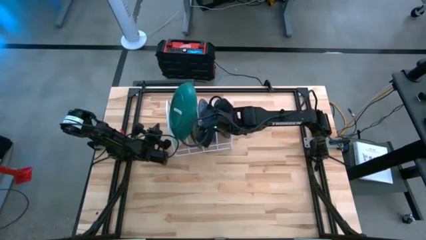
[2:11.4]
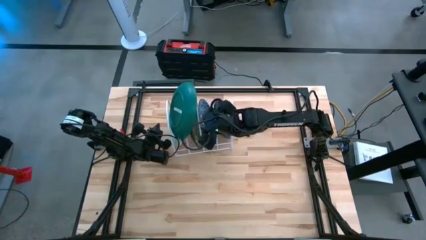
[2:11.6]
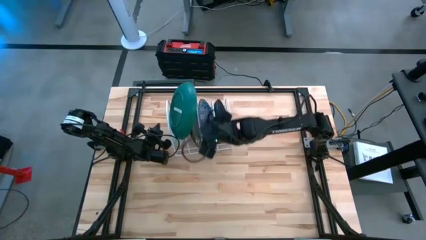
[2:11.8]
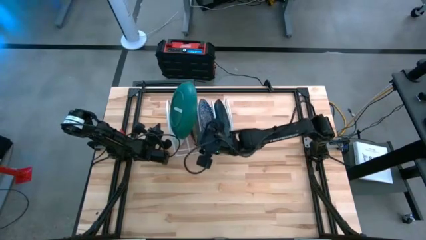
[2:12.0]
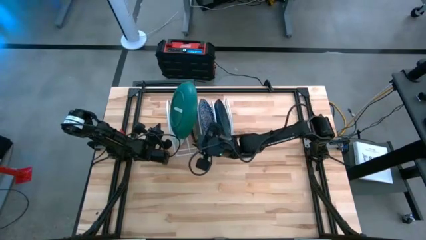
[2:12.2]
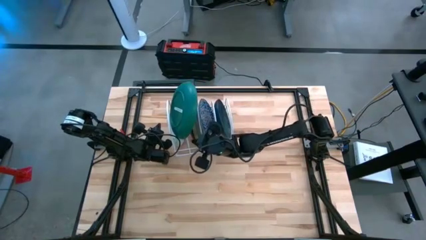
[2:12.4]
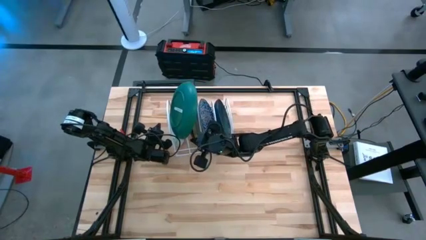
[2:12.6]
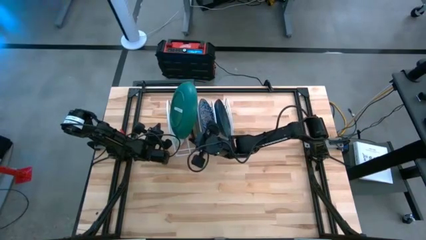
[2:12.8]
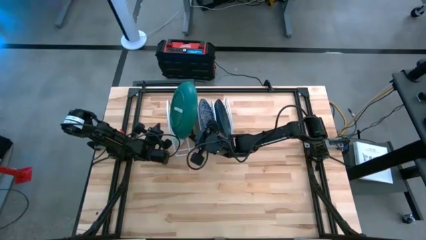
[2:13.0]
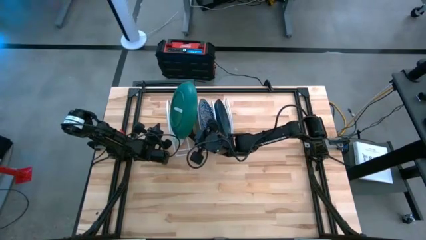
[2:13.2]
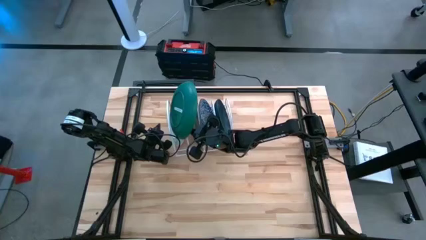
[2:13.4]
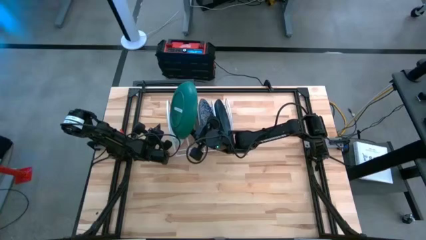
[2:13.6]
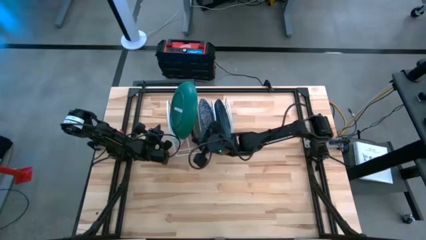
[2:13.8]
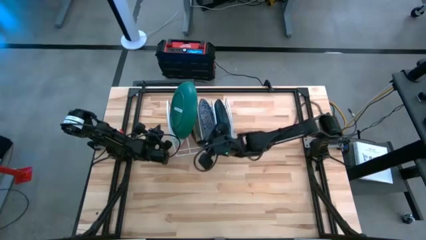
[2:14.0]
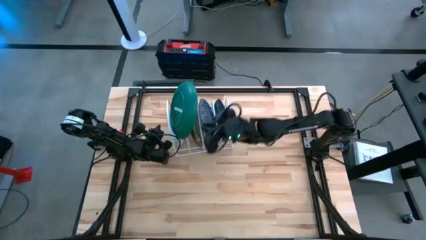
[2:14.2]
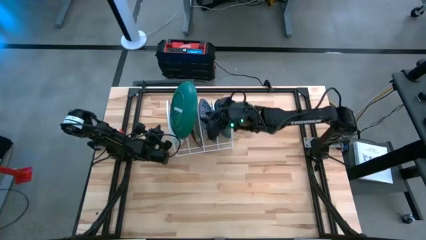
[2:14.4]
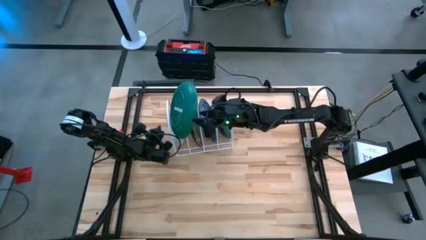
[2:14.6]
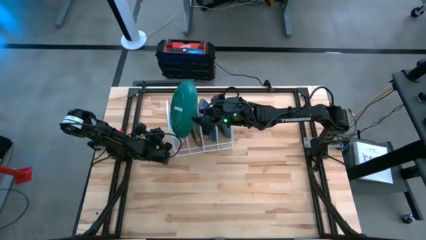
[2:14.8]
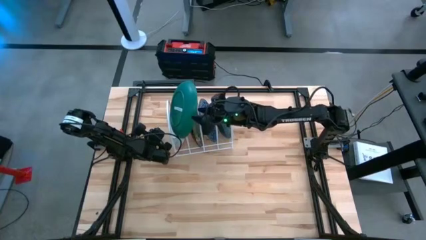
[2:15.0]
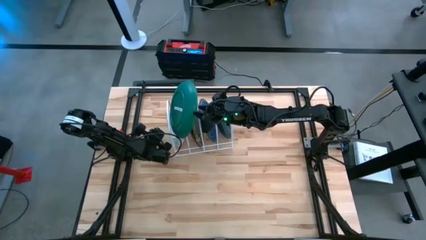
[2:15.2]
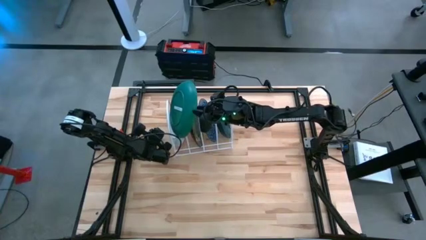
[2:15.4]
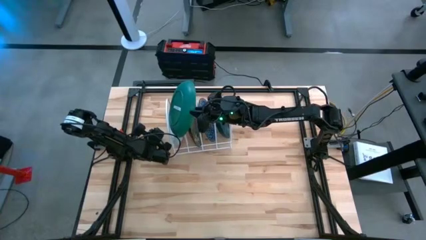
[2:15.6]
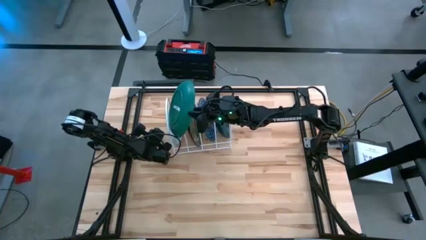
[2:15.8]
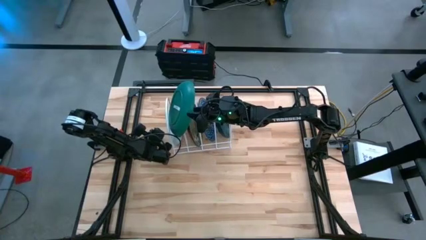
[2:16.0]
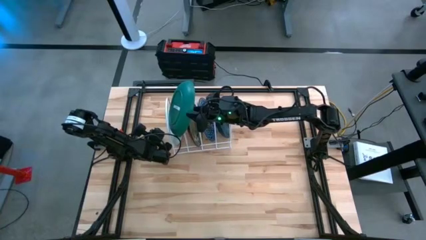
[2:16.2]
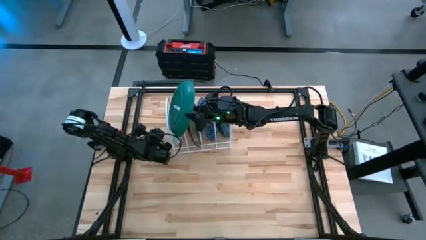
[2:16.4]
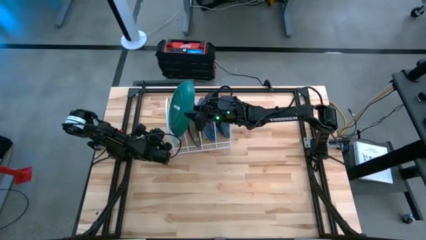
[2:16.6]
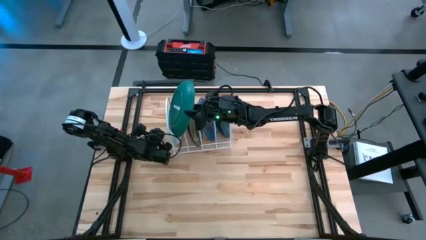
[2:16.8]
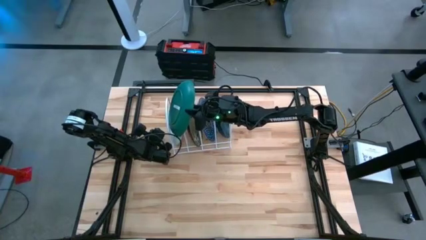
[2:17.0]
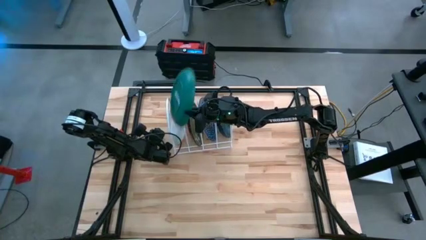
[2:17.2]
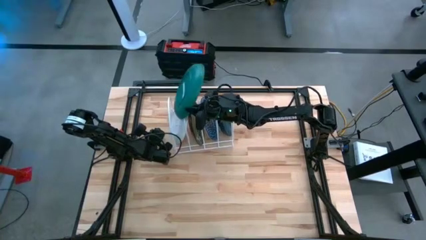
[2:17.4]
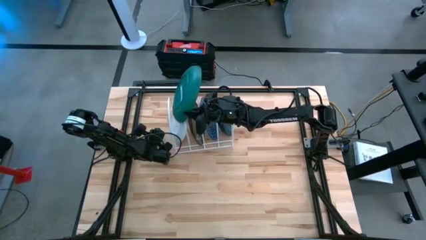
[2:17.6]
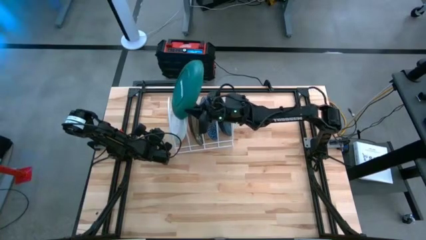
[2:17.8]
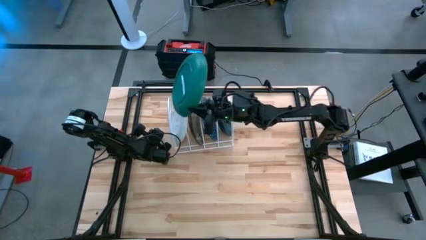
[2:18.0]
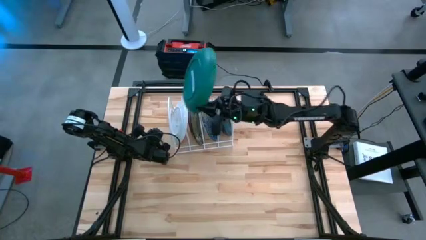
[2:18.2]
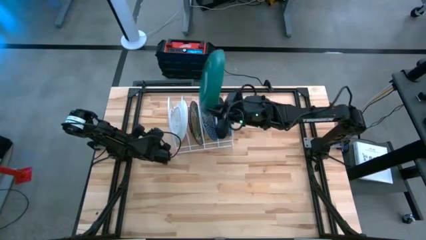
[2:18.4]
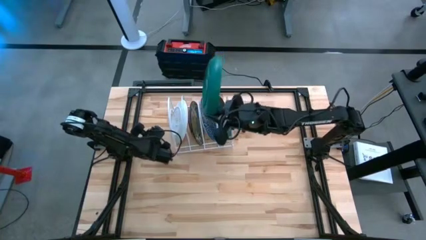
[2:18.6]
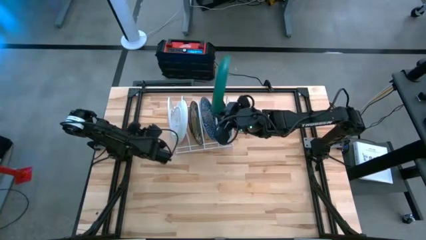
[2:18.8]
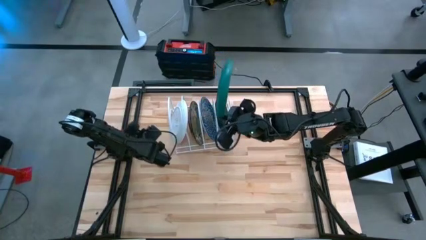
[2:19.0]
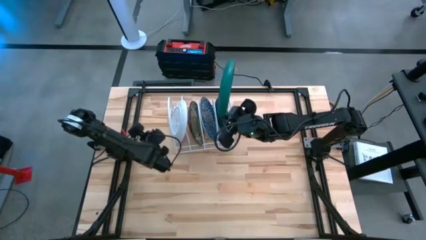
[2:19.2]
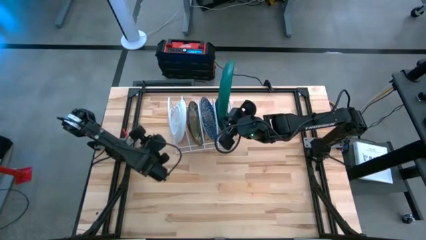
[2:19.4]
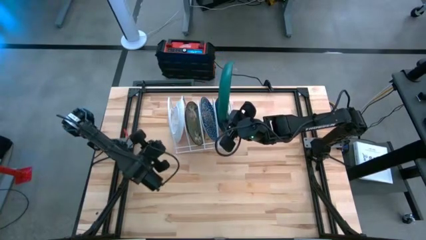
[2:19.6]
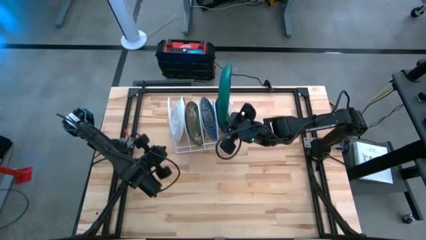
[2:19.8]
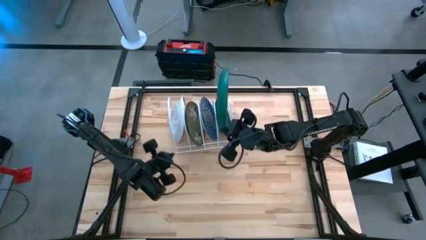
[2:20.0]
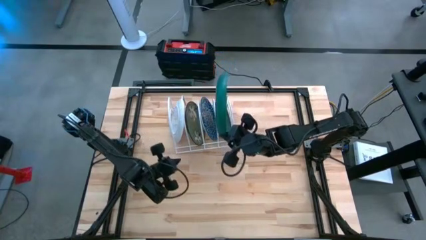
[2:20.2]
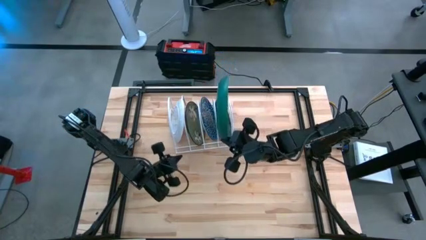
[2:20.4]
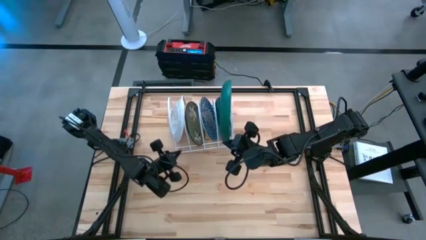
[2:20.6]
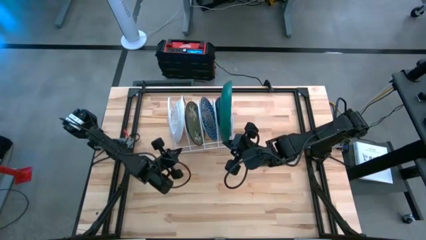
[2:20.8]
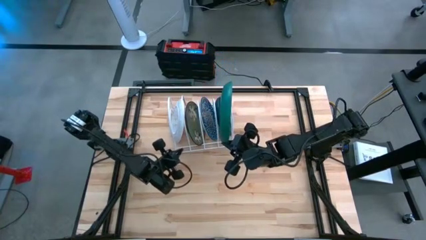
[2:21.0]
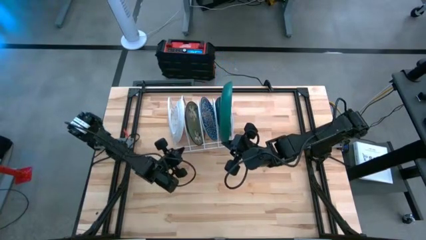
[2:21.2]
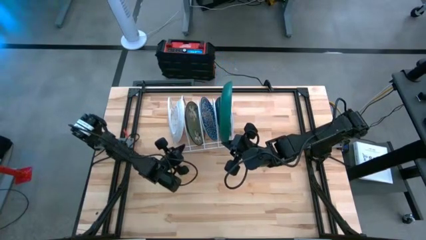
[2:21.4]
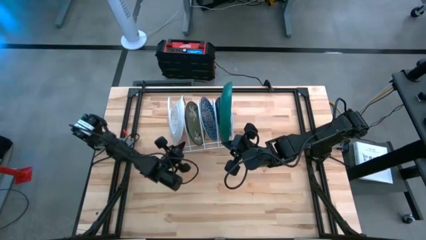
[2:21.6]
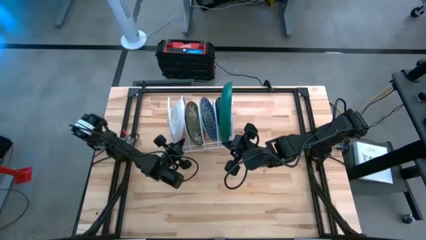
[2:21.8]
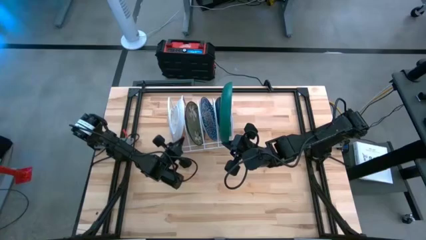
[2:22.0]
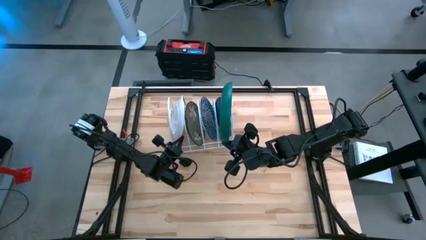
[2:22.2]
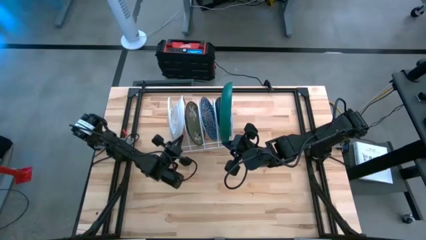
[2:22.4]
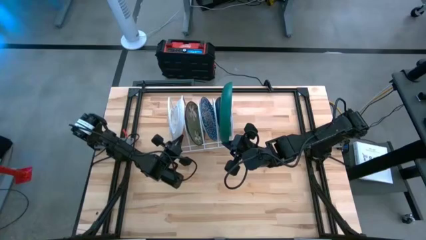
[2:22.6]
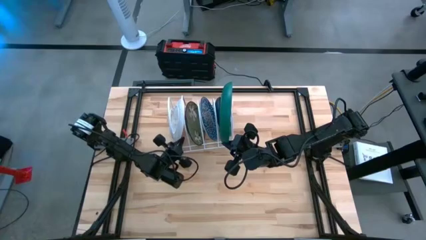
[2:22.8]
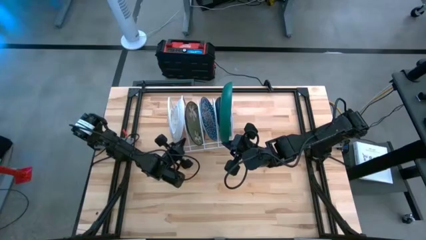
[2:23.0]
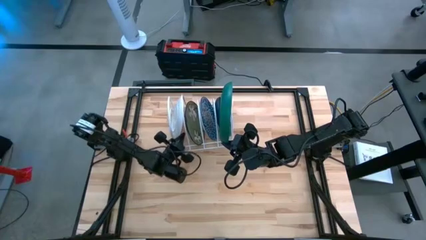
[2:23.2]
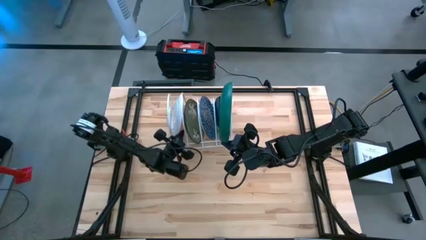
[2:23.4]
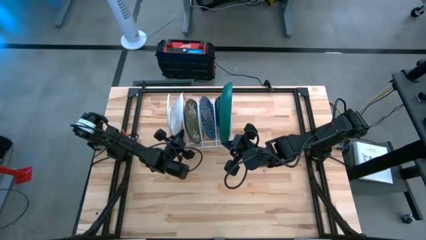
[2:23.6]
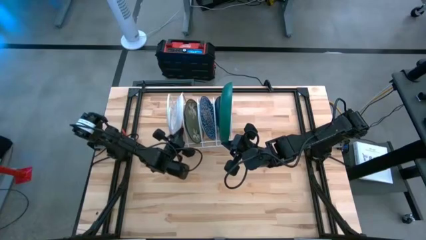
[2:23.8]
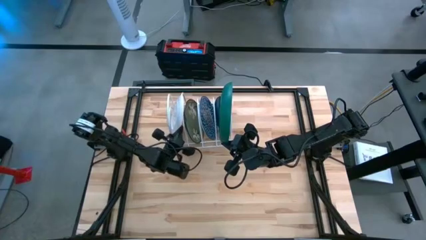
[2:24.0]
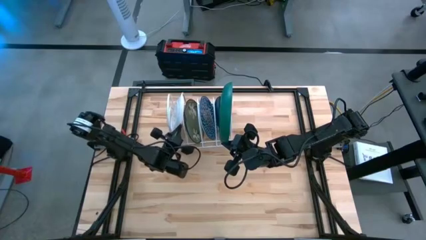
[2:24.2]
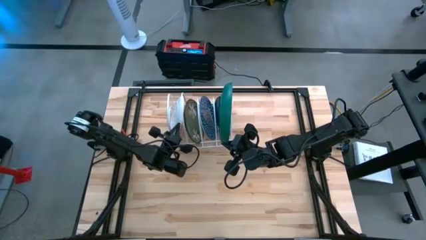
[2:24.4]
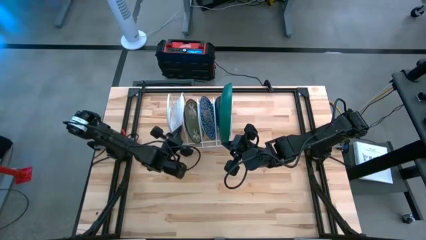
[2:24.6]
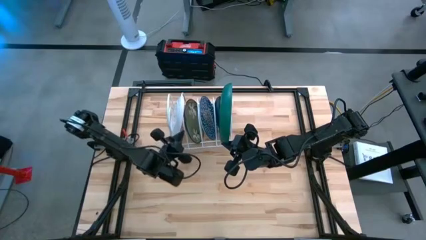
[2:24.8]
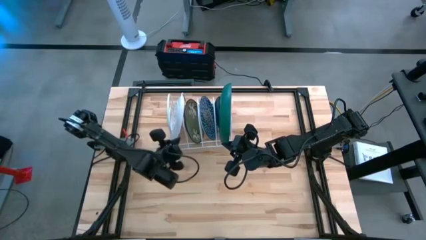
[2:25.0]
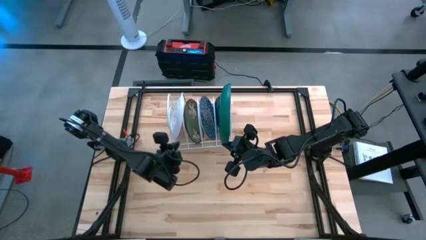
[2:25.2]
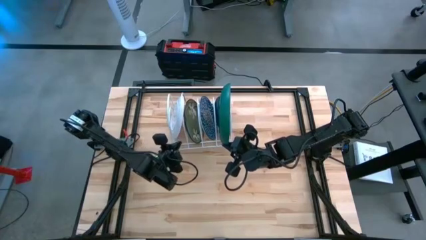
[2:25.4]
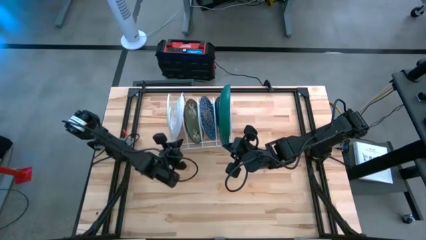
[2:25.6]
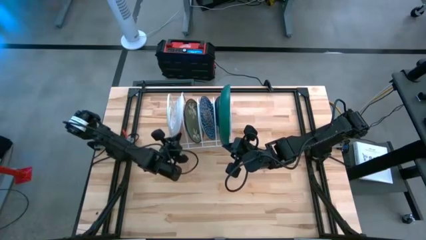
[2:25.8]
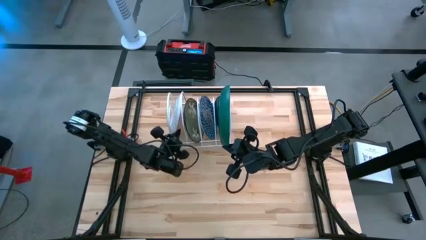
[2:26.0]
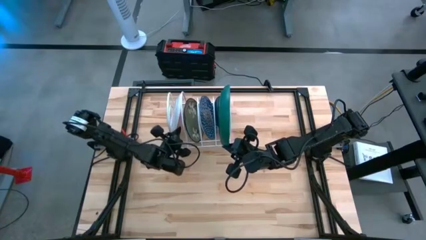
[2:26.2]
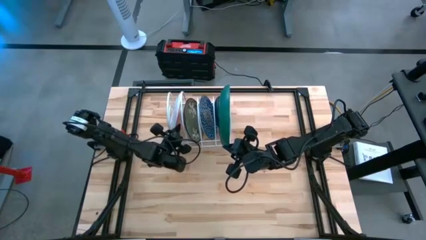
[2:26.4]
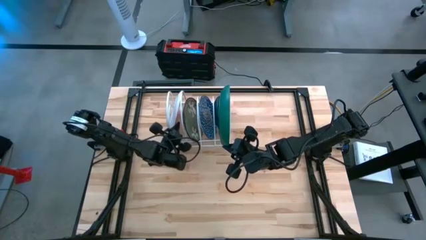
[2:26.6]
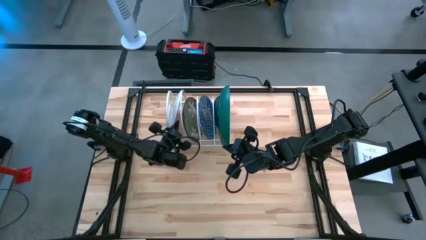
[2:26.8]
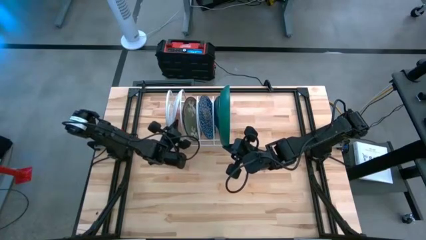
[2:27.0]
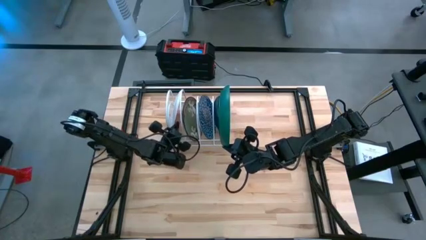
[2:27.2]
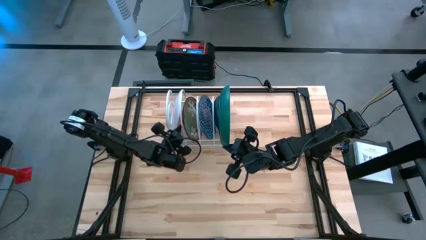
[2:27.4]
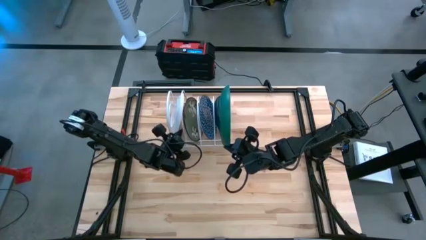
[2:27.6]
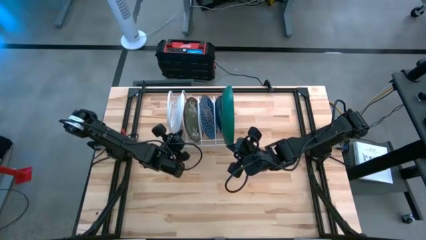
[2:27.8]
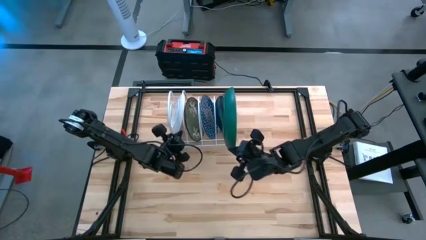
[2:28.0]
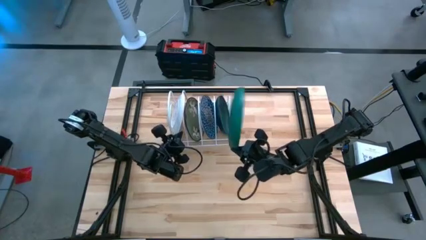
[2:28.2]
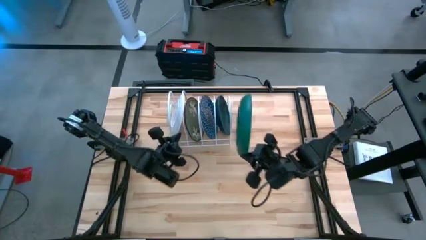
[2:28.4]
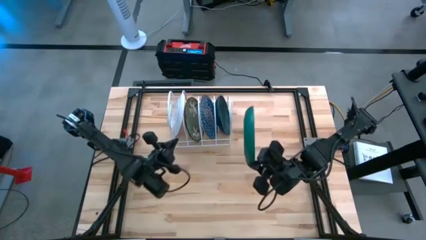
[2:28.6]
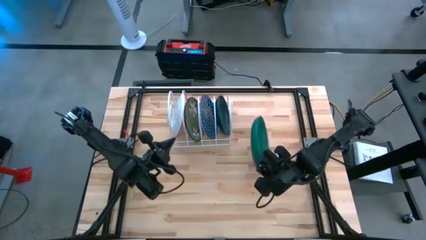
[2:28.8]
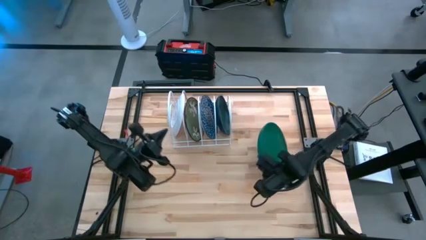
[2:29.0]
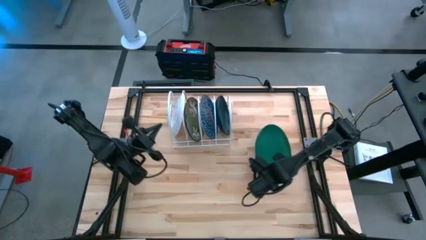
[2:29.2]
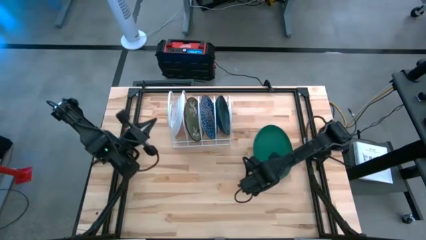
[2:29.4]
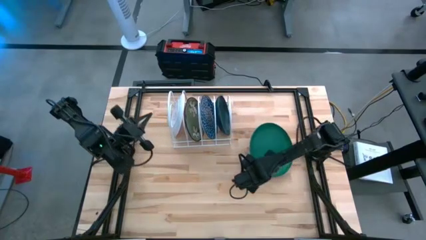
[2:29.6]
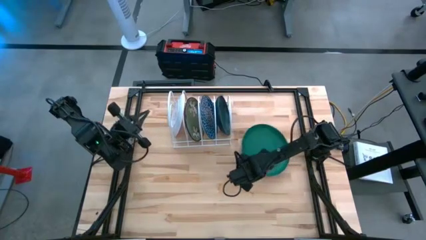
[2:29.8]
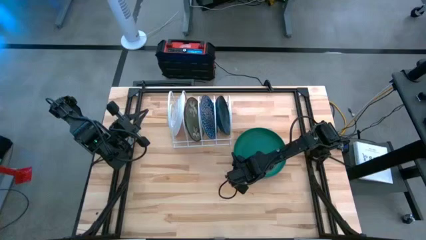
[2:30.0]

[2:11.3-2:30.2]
Task: Sort dishes
Remove the dark green plate from the dish rack
